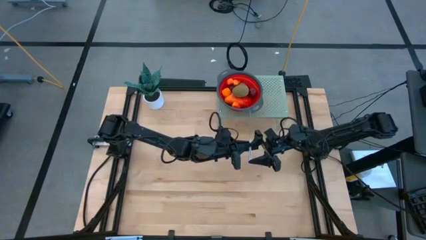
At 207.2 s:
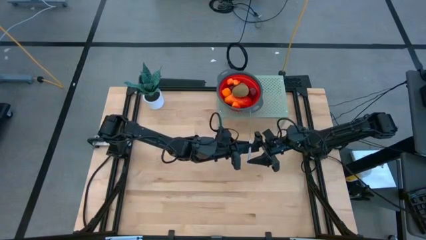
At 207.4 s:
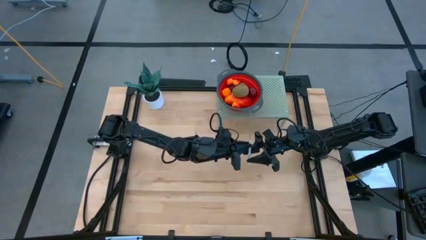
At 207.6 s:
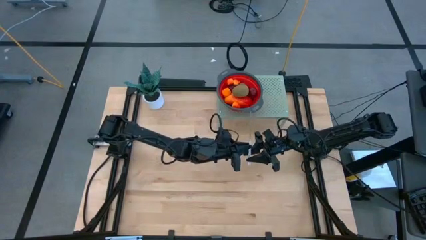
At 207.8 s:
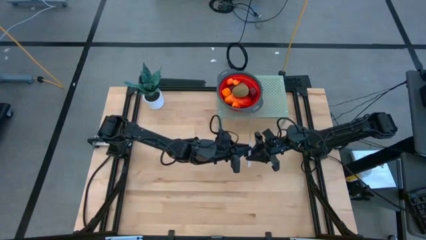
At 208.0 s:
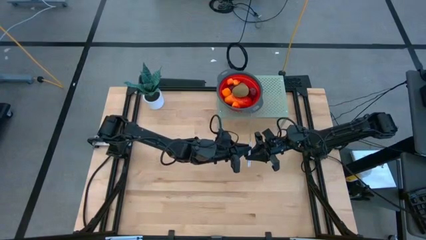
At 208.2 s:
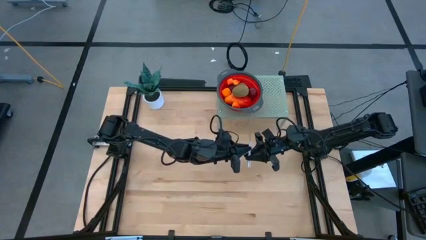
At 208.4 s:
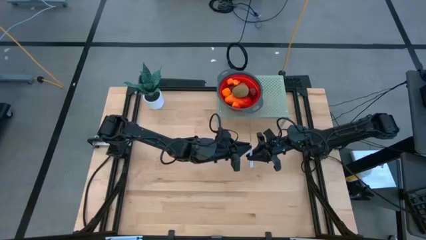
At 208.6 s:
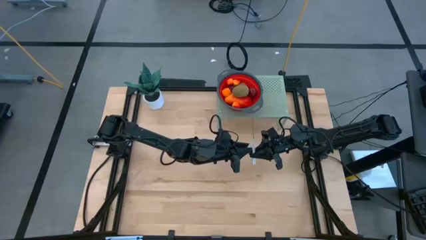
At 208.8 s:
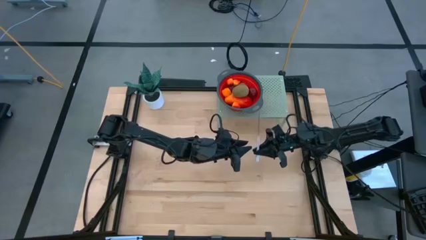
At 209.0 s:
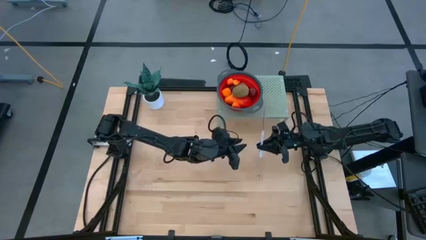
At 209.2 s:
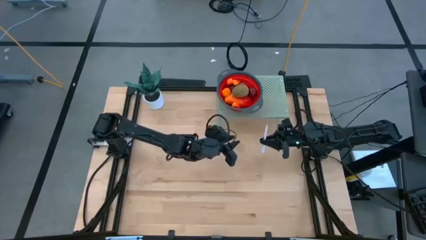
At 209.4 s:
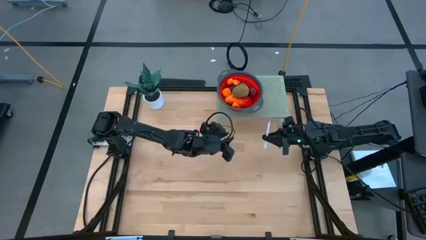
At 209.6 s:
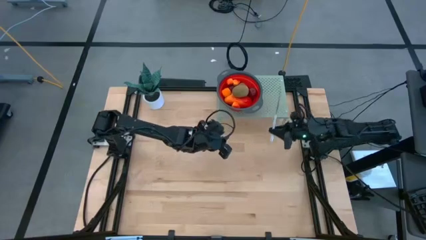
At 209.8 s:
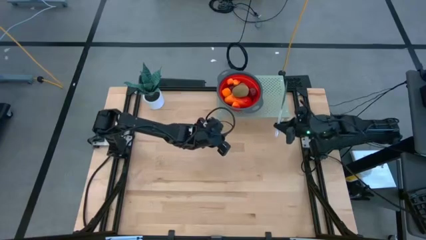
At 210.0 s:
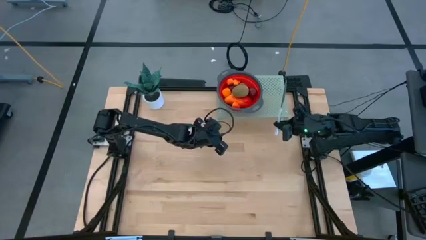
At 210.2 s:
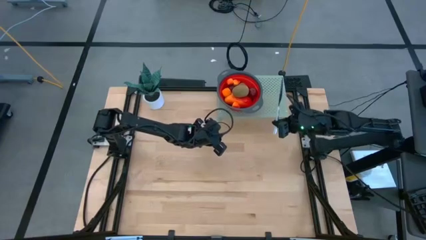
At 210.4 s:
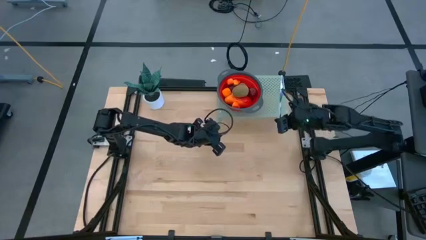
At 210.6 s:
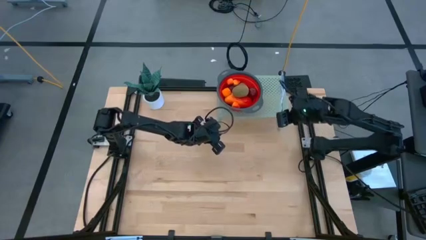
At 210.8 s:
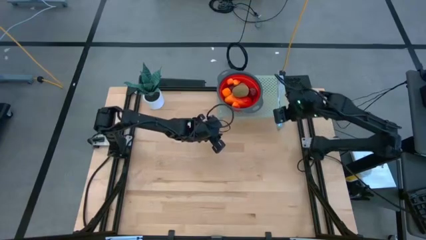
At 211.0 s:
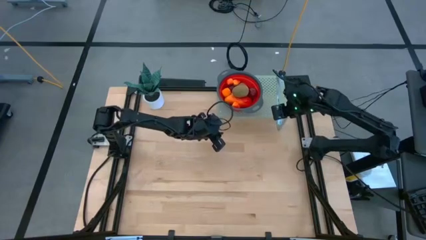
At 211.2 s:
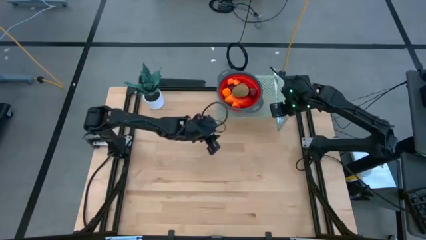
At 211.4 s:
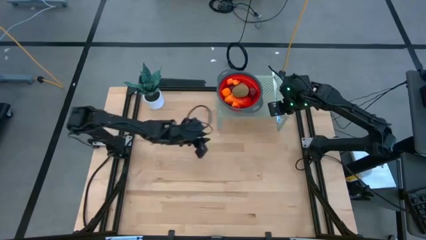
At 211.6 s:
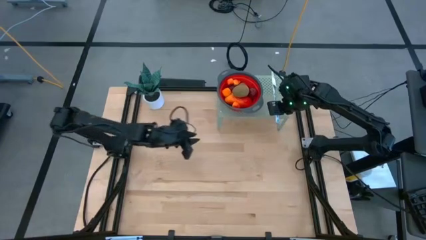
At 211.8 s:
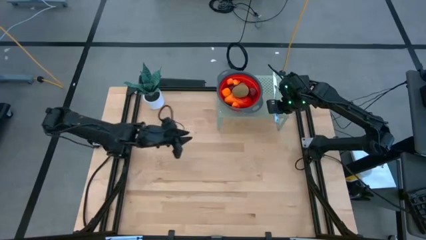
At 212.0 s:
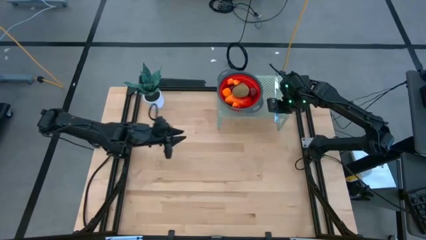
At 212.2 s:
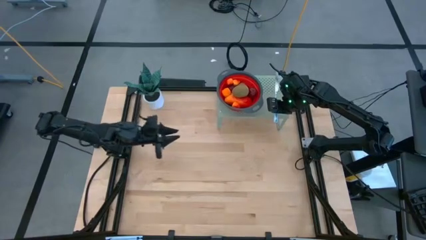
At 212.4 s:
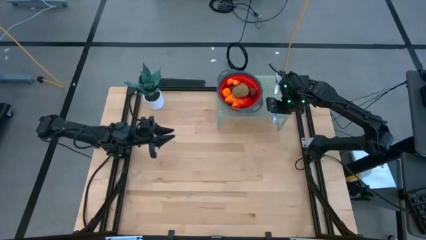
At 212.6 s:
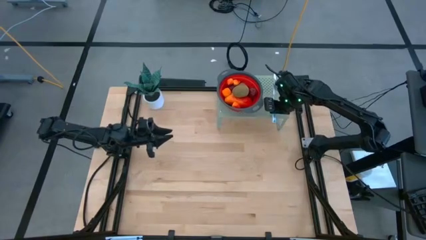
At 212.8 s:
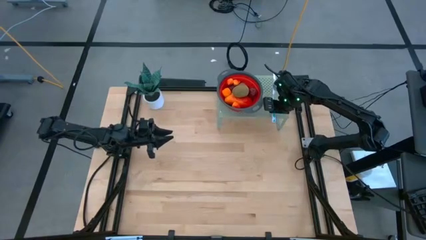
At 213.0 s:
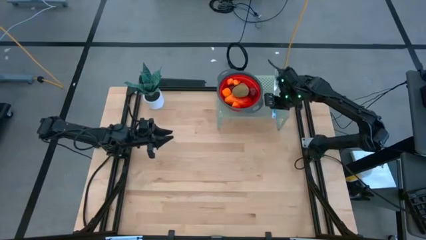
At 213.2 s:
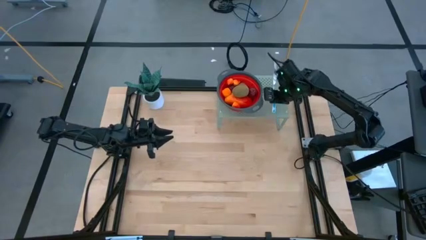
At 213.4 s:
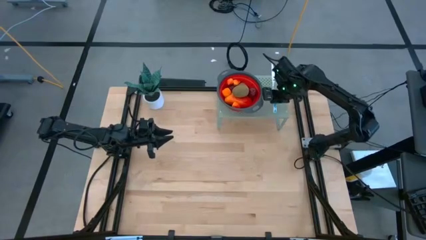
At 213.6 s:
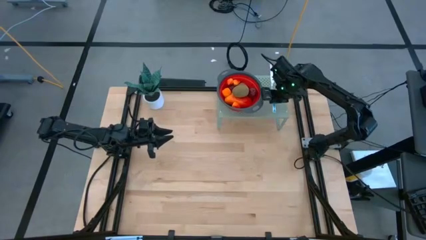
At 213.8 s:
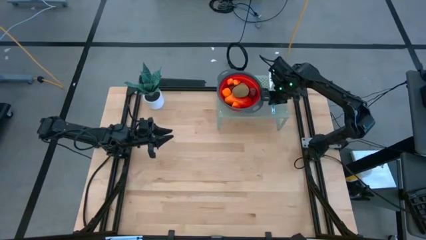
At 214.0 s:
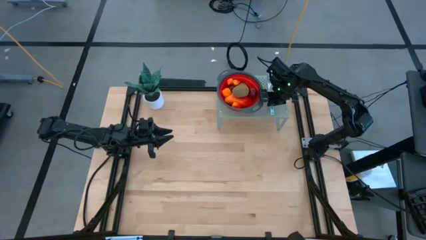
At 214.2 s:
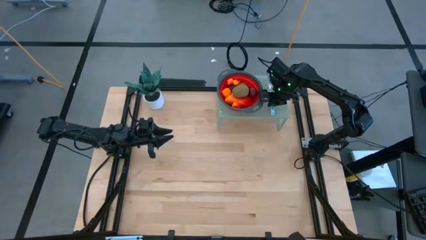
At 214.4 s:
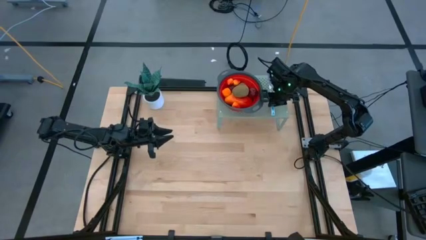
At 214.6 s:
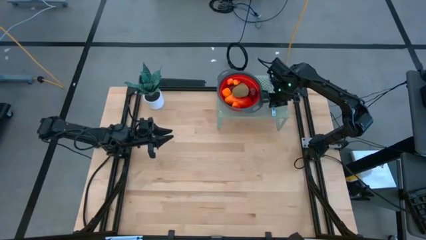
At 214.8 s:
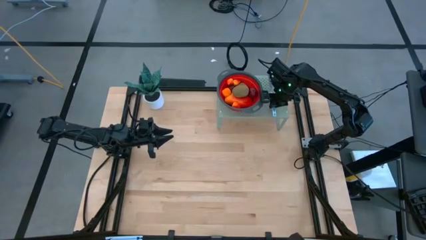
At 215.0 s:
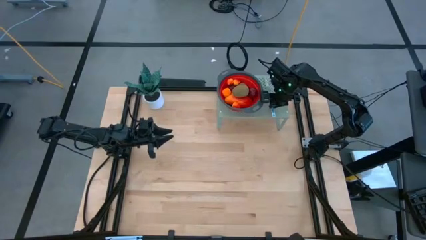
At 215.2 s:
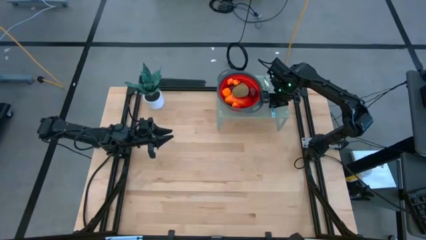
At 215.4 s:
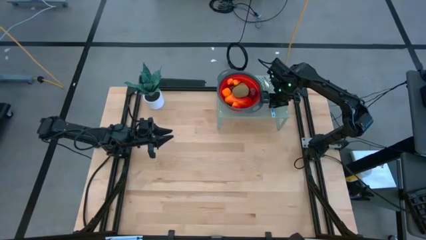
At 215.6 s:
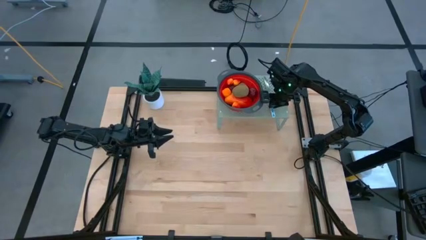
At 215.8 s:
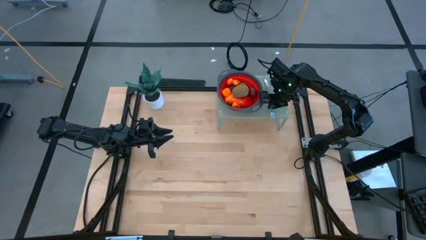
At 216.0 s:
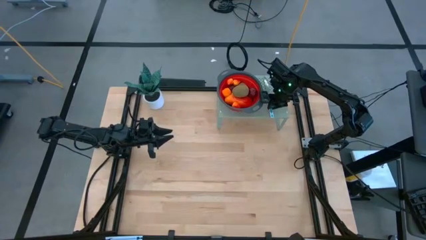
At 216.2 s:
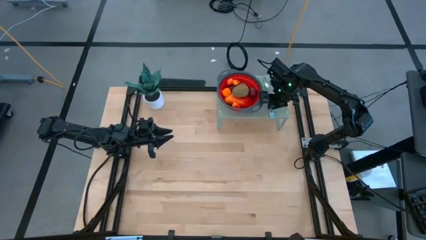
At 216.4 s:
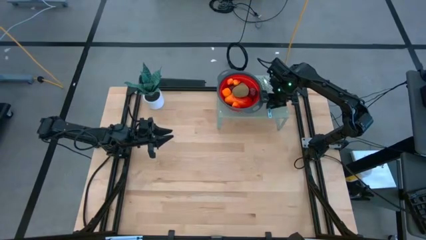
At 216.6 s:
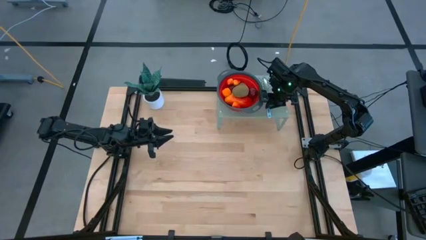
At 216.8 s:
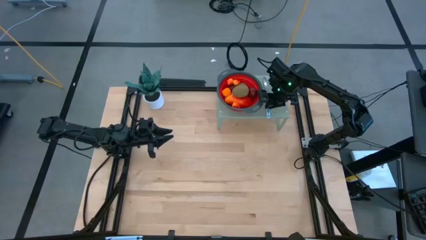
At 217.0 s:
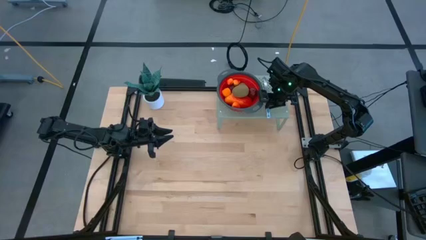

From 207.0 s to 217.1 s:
Task: Pick & Place Fruit
Put the white knife on the shelf

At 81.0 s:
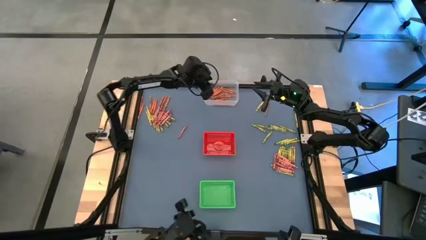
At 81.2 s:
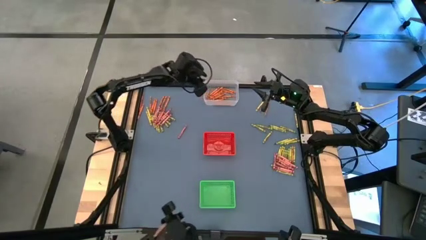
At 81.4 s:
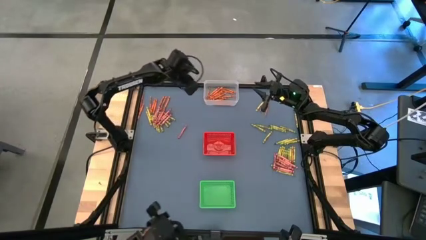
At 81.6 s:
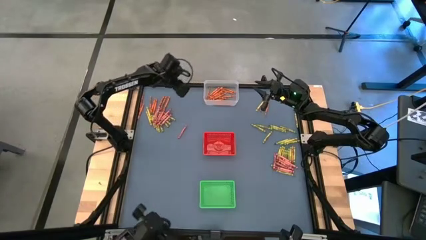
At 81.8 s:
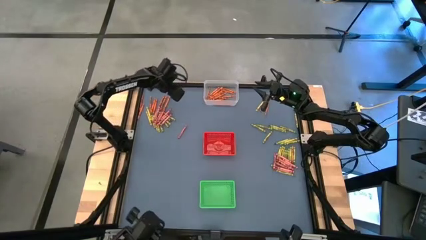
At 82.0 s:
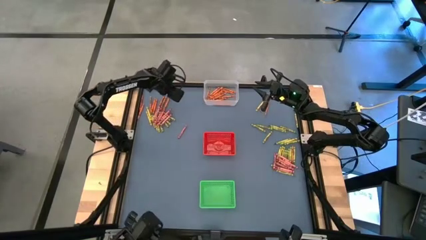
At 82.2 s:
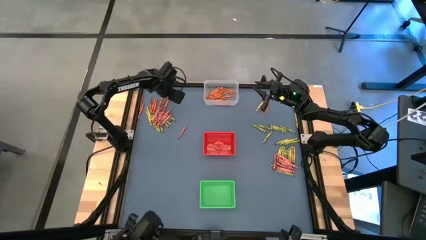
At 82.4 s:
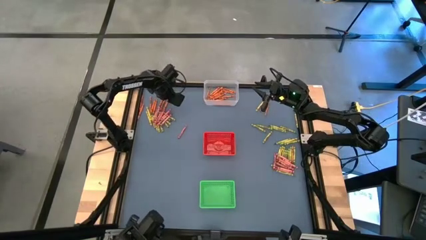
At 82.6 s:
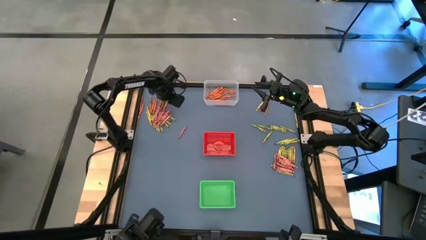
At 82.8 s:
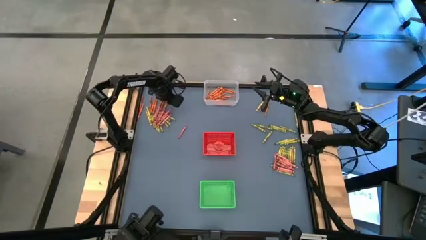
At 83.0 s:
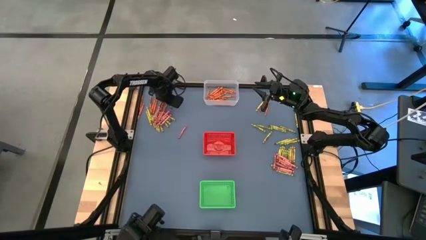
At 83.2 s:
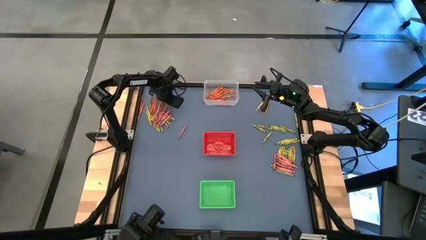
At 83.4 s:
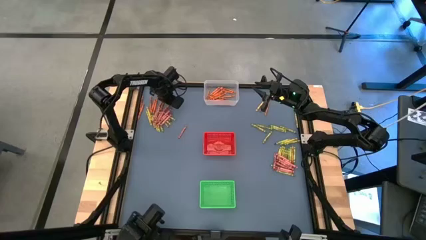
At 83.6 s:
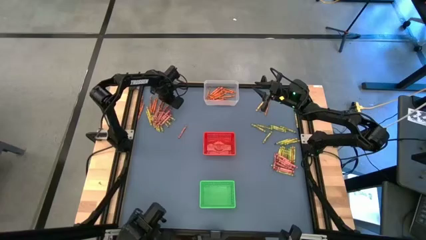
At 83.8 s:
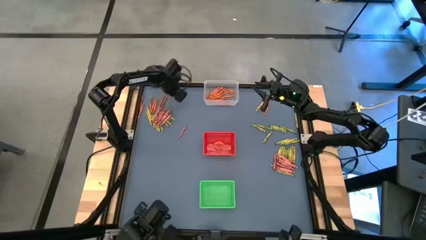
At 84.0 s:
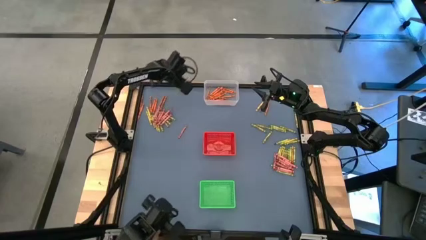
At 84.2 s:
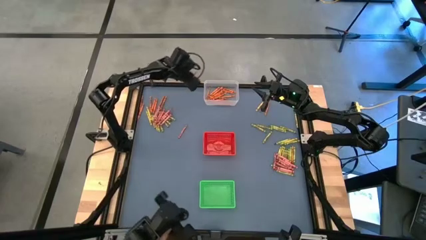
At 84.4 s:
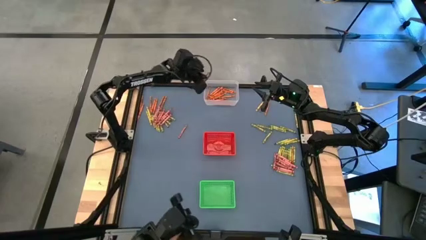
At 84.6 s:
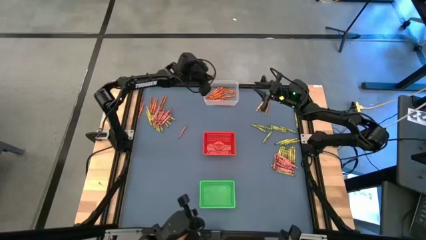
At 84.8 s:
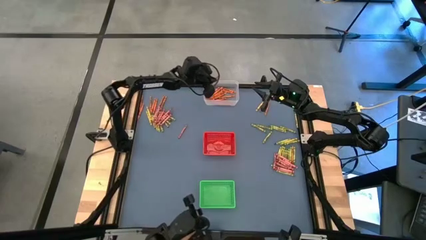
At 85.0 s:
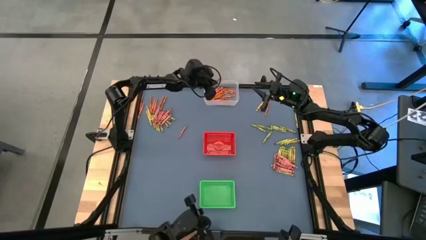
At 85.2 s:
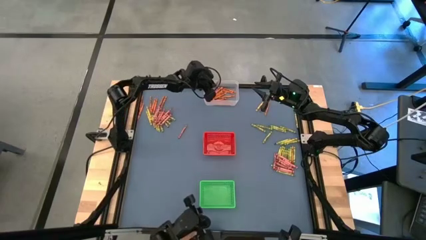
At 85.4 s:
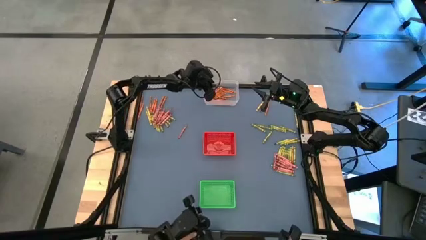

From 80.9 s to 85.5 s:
Task: Sort crayons
Put the orange crayon into the transparent bin
